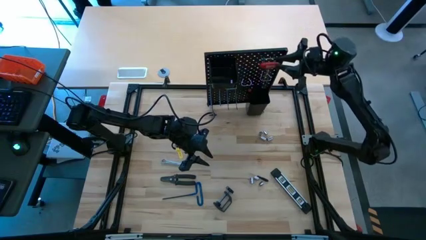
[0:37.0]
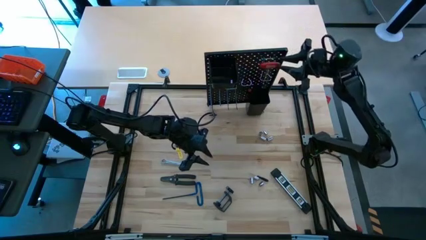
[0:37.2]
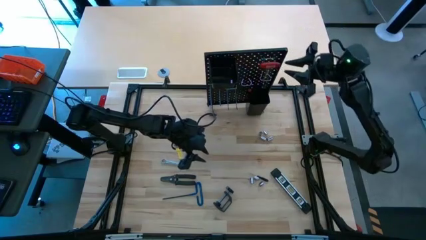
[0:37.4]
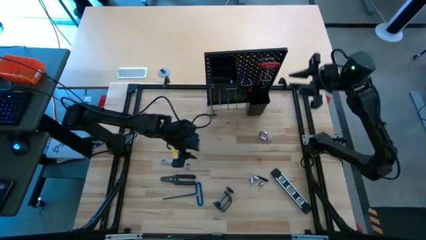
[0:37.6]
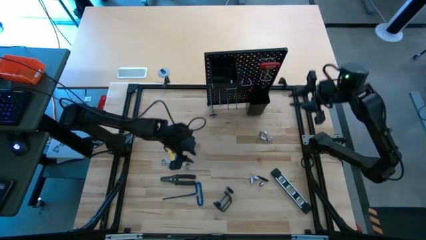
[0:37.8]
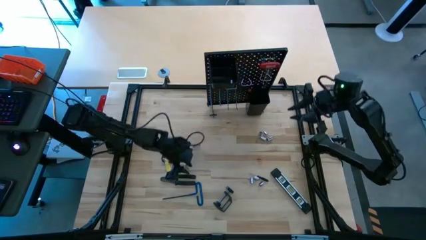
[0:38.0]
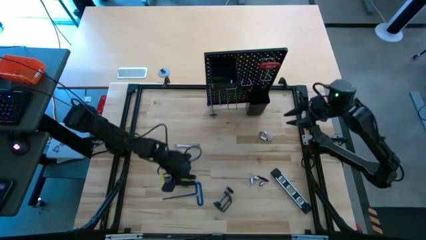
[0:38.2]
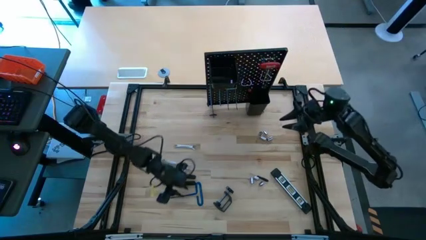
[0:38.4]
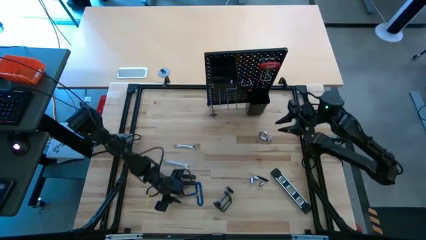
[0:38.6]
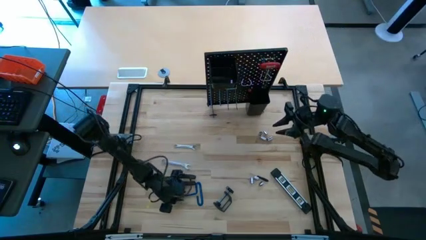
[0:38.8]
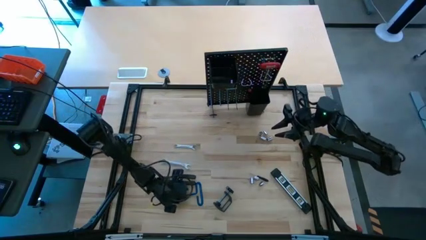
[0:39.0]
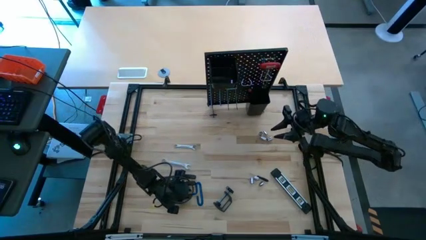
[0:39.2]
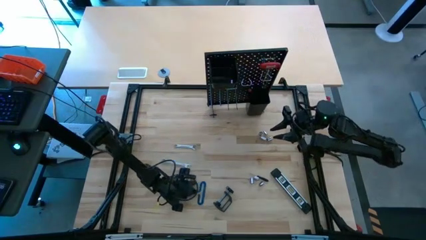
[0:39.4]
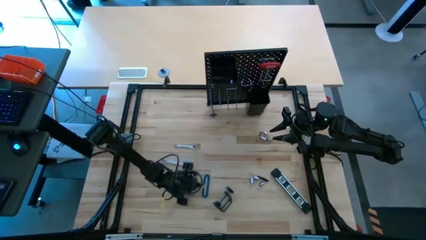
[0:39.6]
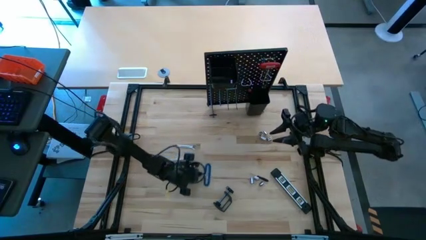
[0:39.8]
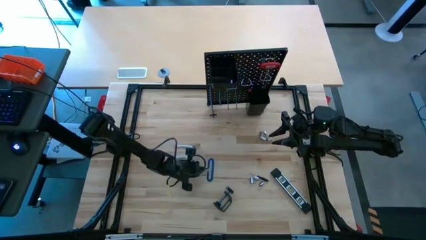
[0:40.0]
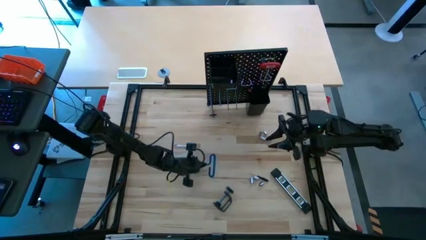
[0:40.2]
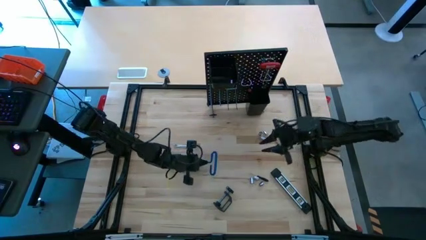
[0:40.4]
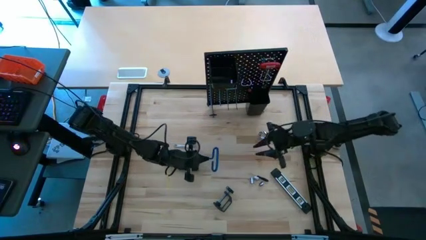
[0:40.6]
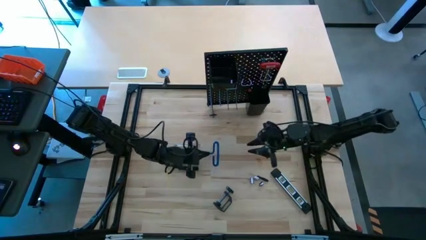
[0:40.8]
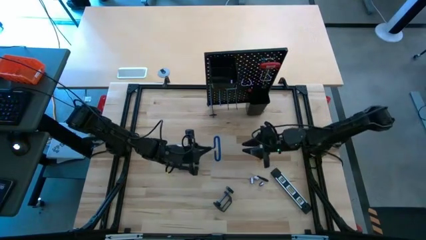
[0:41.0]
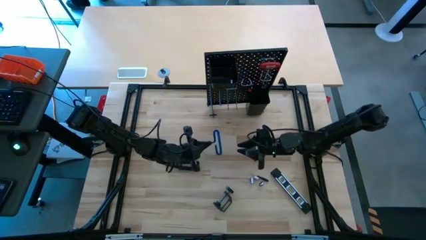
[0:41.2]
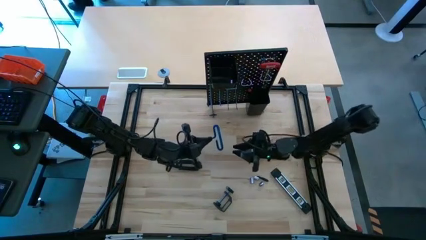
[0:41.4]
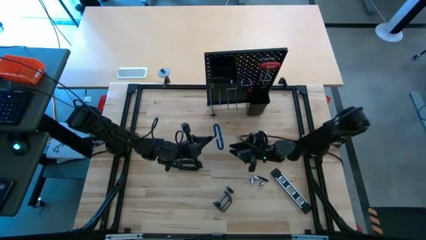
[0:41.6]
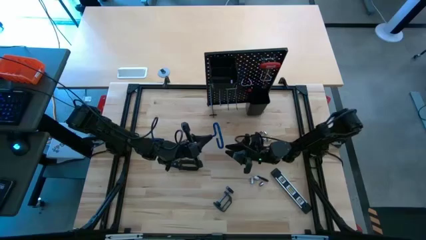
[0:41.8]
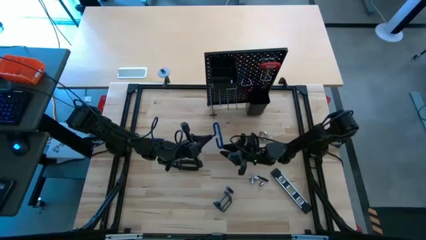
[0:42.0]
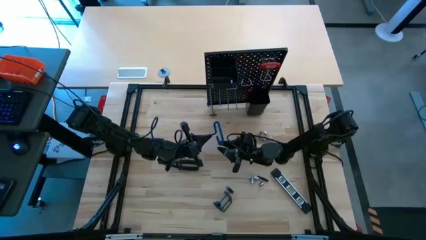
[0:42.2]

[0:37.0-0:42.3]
Task: Hang tools onto peg board
Hang the blue pick tool on the top hook on the peg board

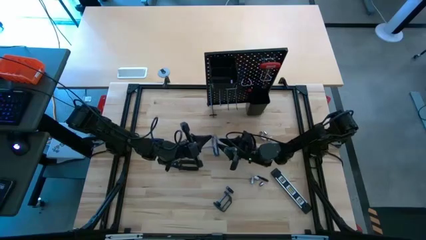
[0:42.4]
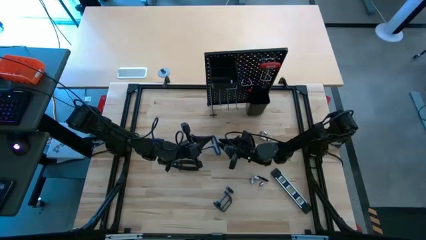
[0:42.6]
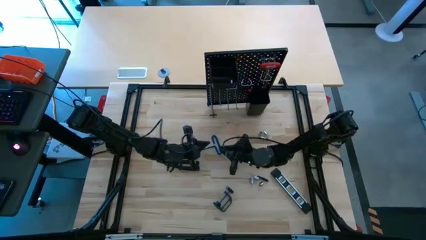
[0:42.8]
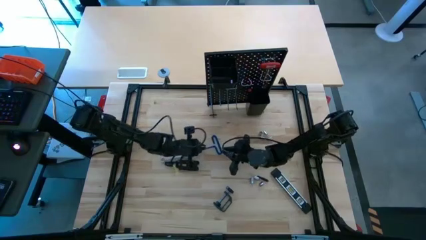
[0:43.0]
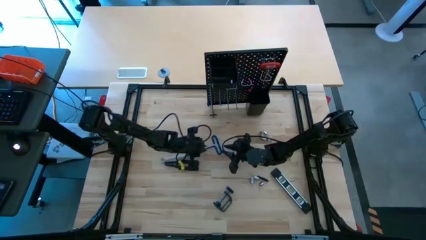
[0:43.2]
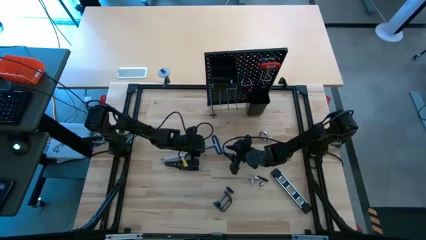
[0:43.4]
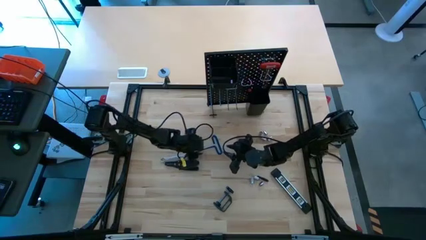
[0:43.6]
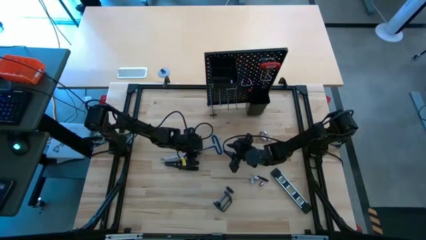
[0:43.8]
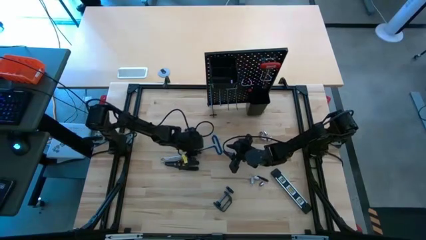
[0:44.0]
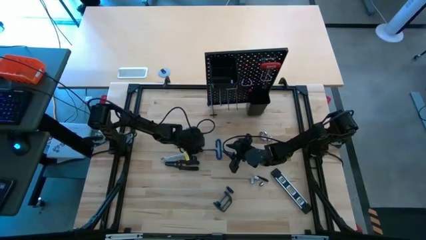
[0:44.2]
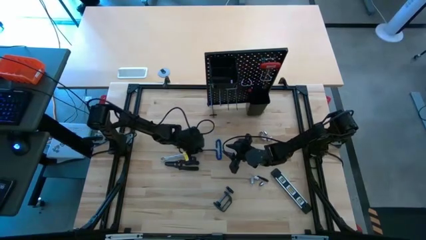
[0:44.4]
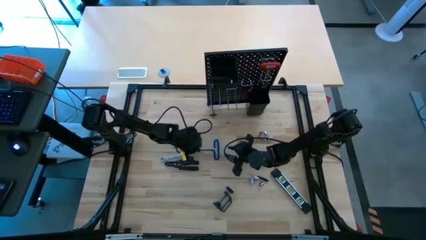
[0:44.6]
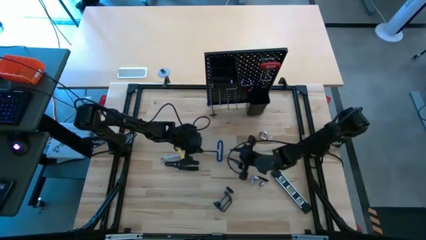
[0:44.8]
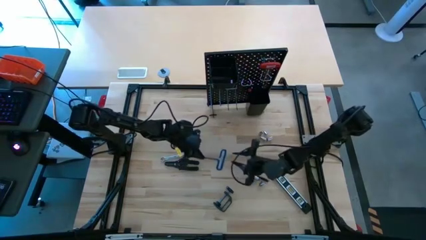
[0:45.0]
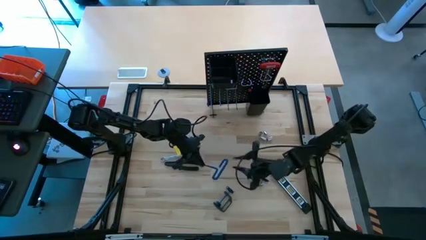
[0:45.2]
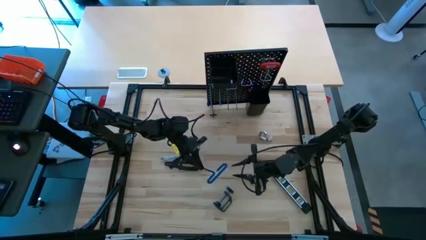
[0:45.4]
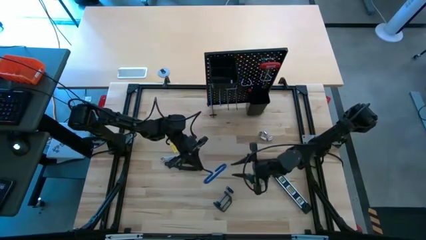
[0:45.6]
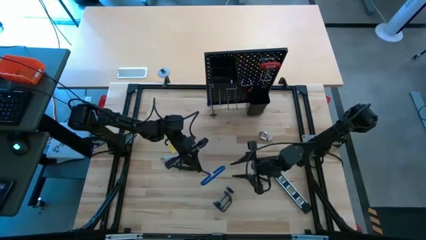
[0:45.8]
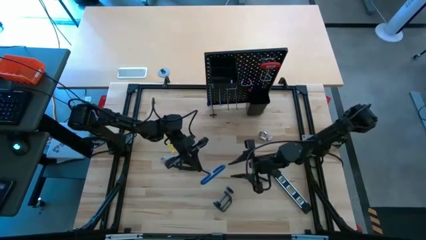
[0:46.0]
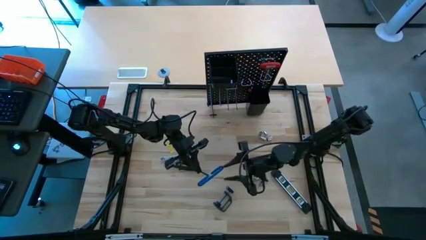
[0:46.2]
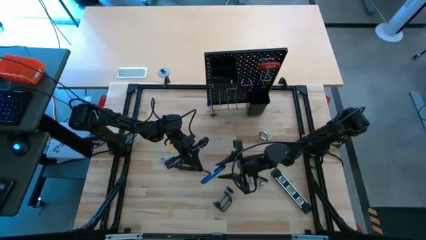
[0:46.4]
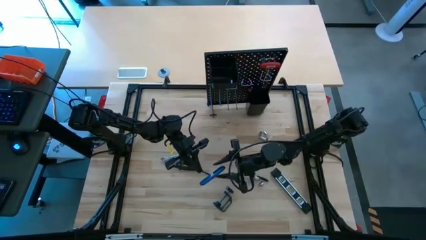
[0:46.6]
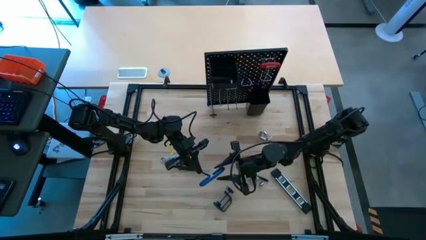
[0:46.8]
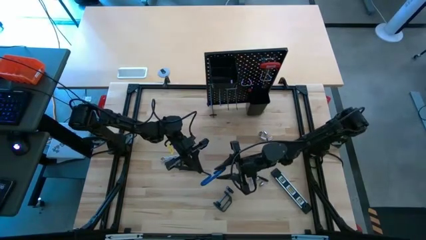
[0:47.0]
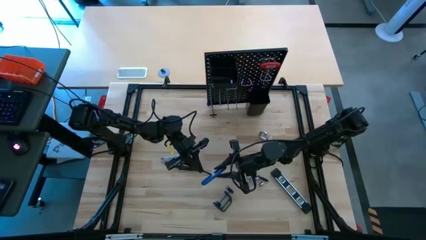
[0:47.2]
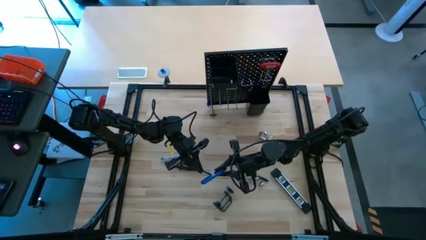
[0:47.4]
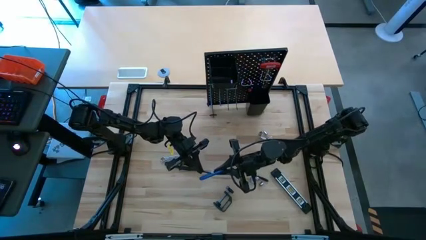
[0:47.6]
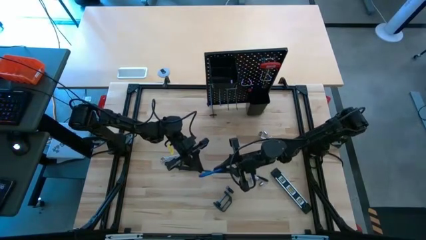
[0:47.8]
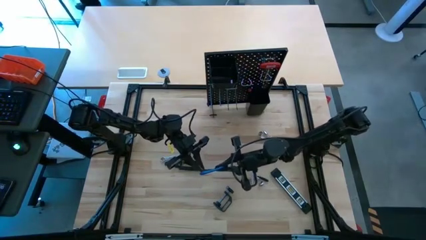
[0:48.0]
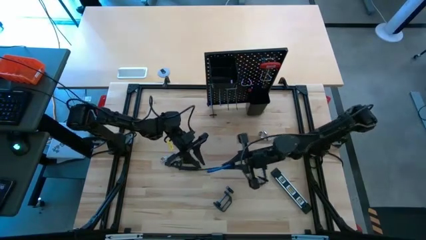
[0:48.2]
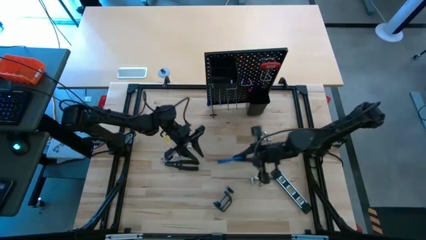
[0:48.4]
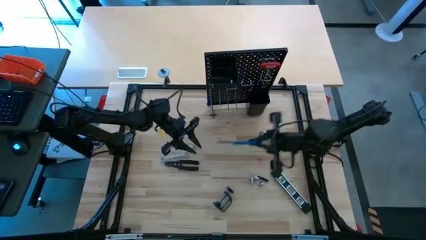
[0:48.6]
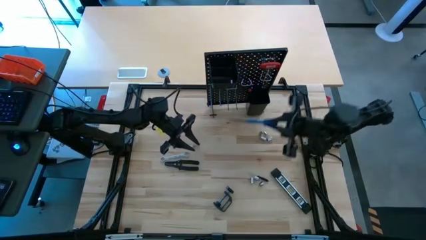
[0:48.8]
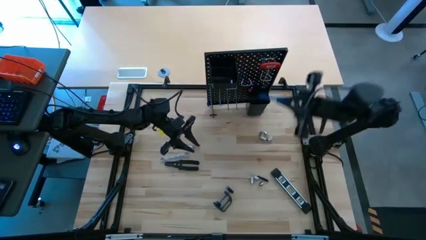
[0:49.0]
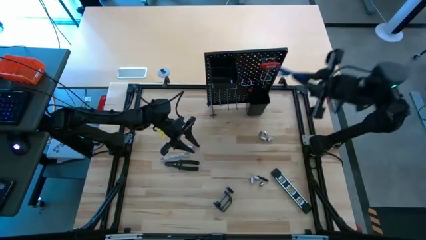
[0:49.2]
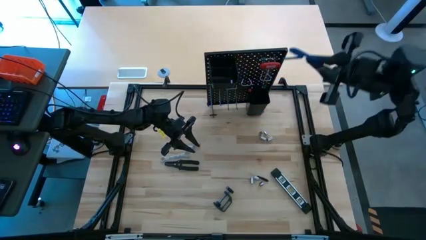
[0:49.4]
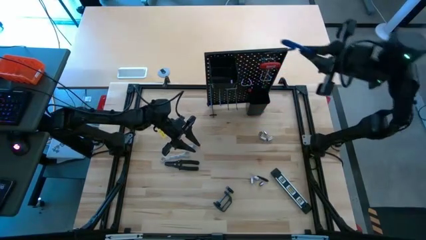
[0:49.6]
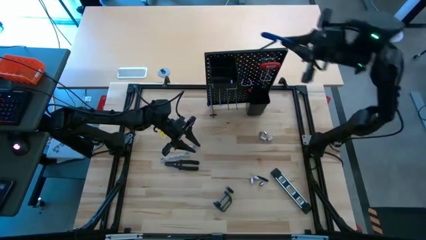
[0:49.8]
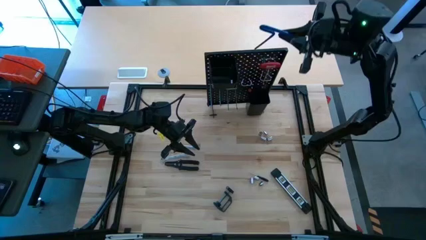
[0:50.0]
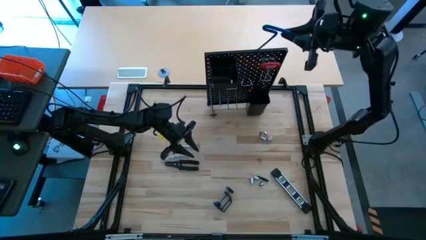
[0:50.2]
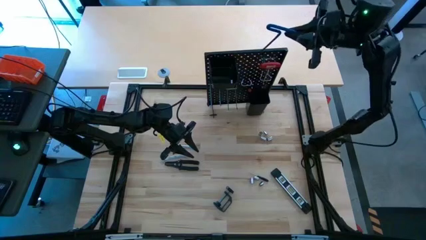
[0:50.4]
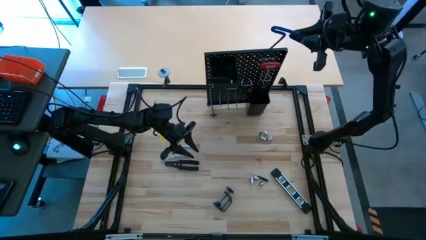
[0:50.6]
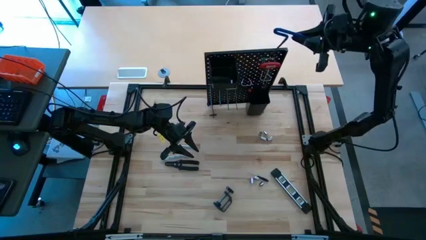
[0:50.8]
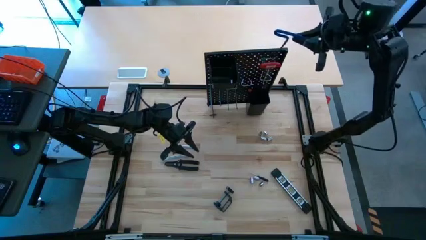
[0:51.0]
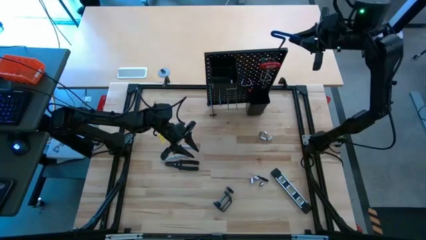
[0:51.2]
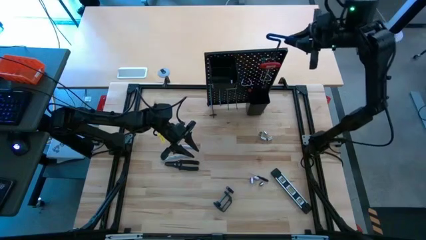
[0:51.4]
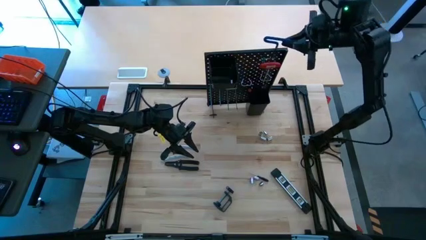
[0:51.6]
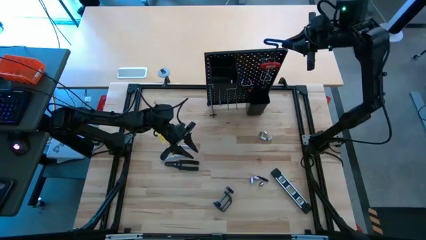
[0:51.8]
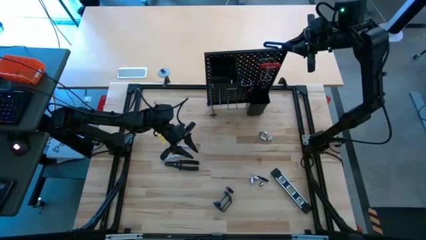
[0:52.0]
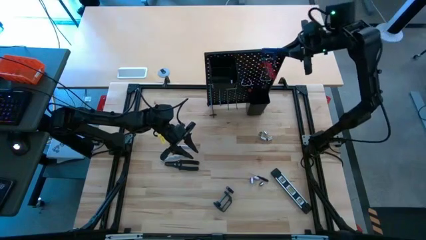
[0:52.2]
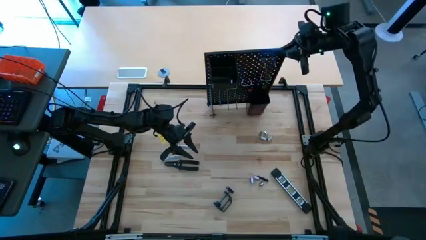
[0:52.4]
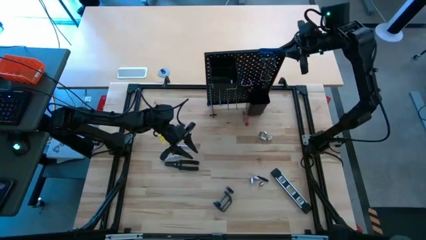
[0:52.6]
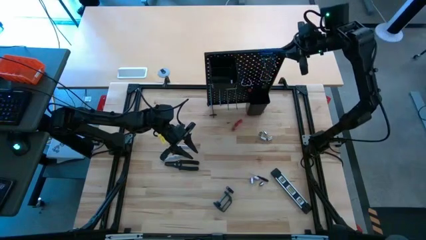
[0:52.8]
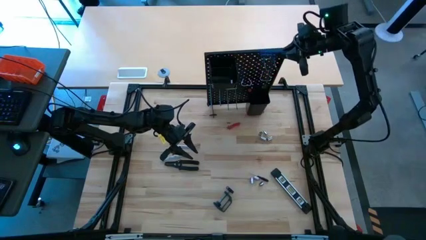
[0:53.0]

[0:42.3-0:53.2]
Hang the blue pick tool on the top hook on the peg board
